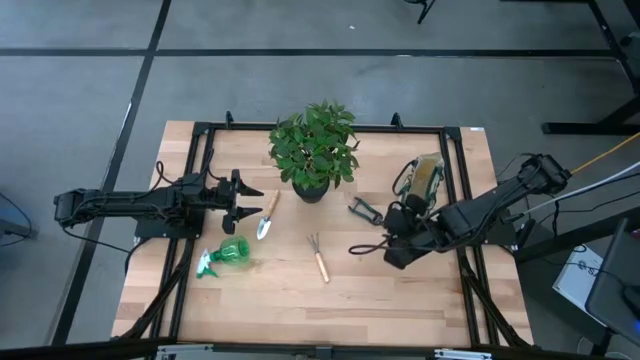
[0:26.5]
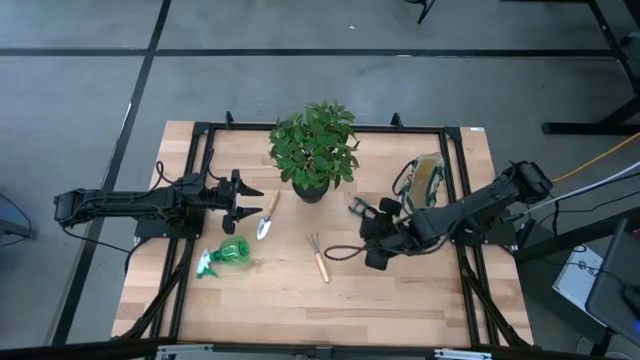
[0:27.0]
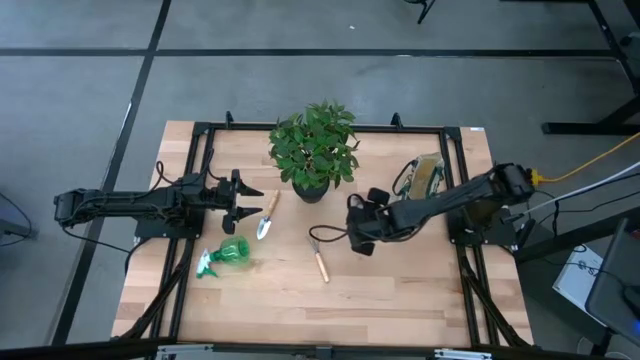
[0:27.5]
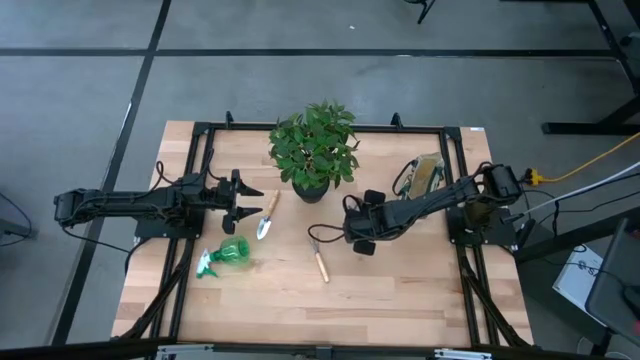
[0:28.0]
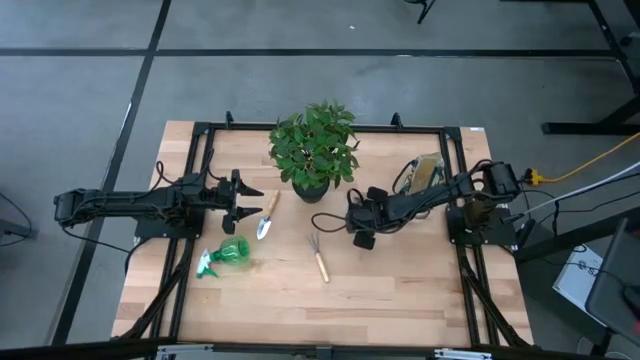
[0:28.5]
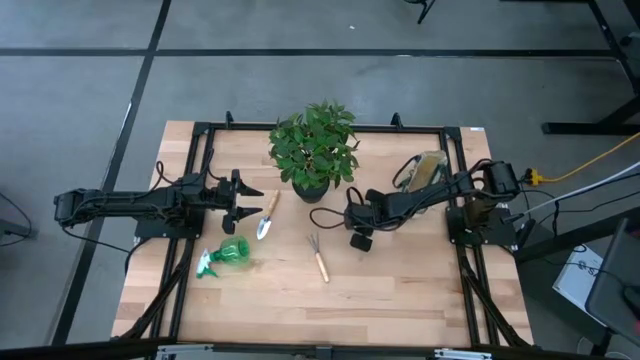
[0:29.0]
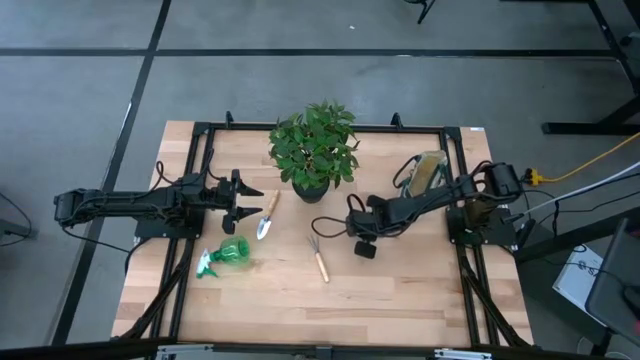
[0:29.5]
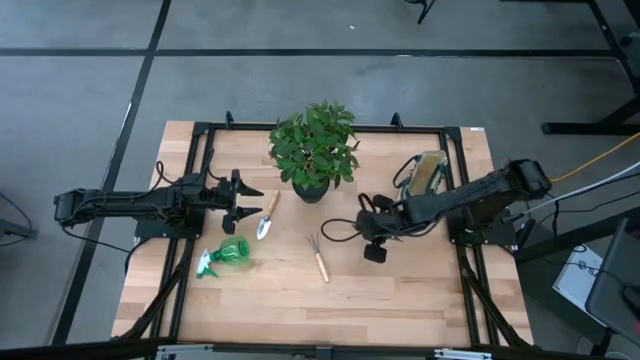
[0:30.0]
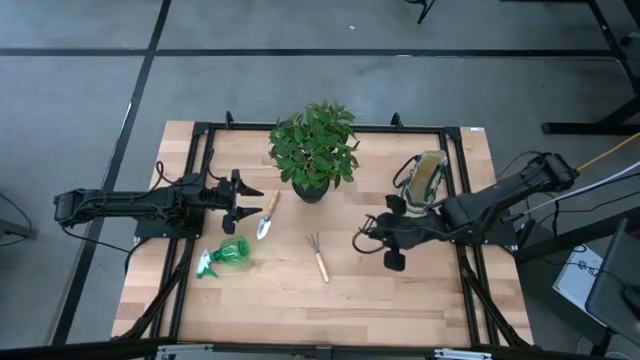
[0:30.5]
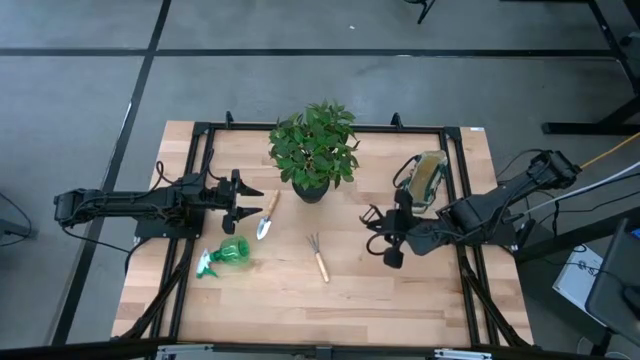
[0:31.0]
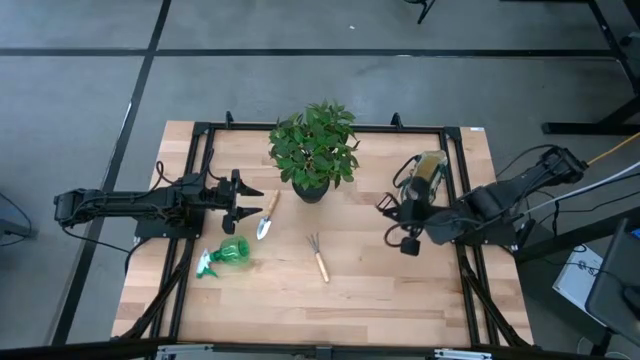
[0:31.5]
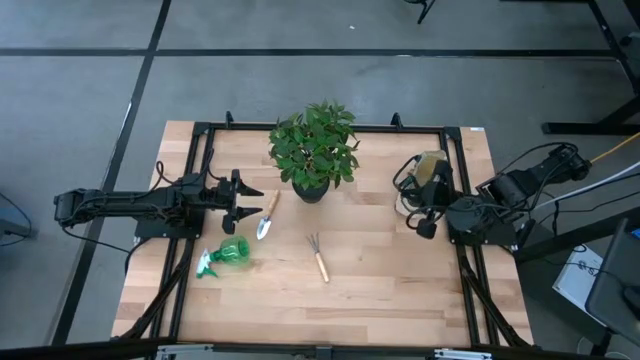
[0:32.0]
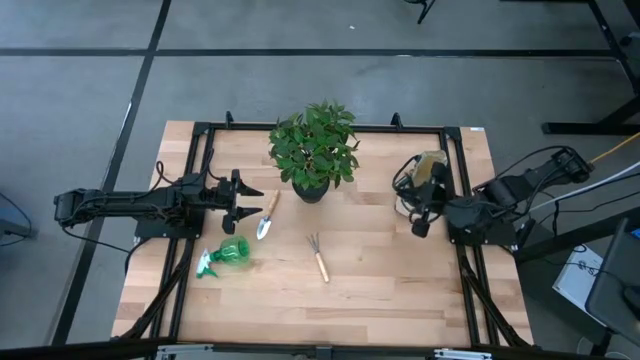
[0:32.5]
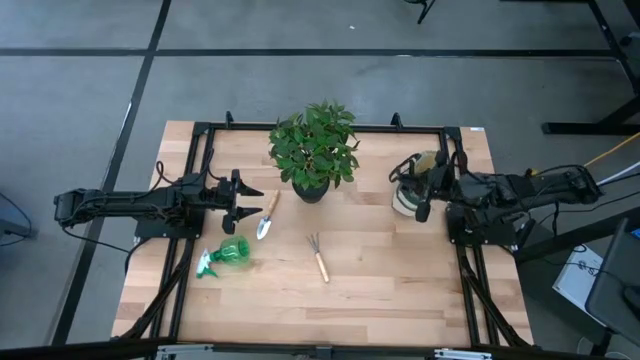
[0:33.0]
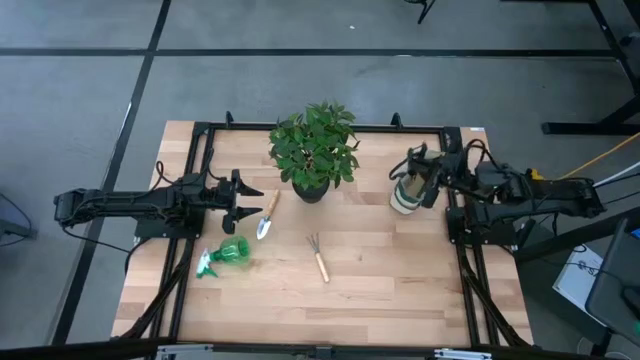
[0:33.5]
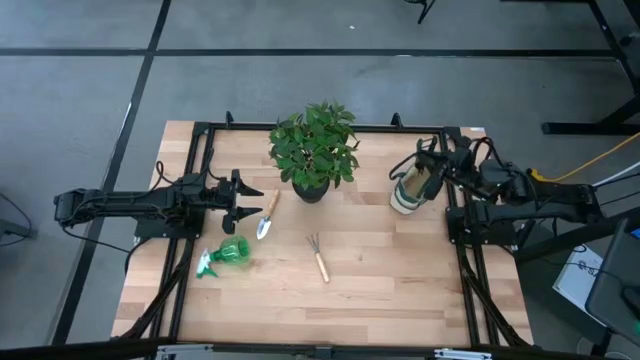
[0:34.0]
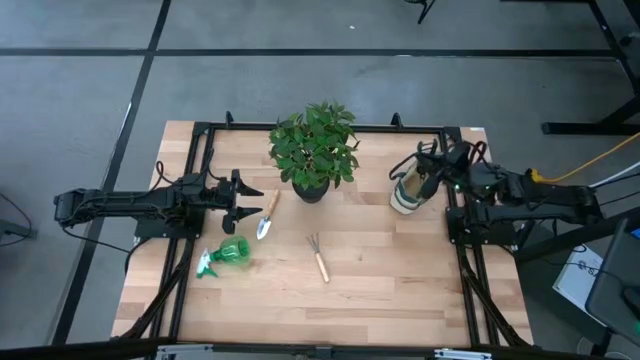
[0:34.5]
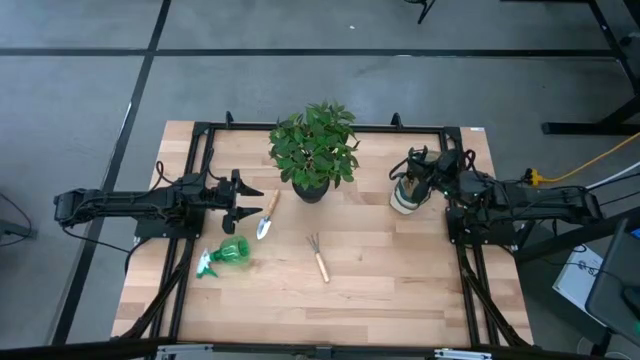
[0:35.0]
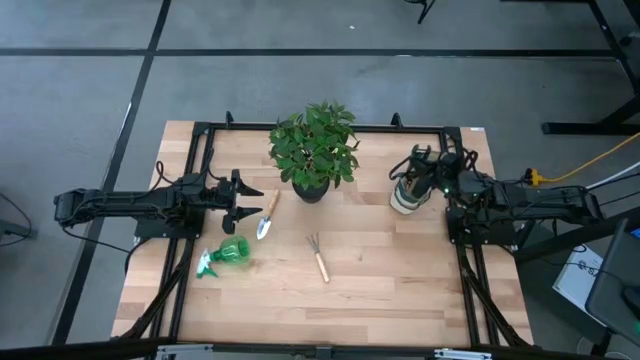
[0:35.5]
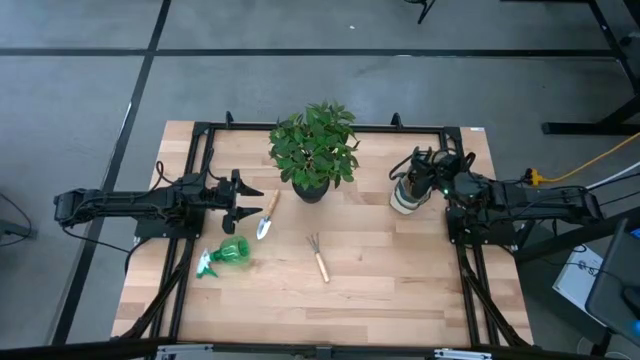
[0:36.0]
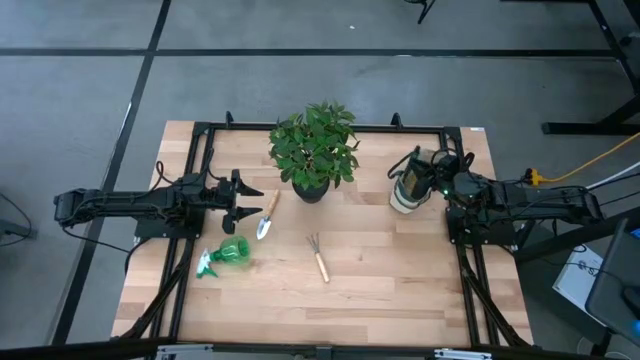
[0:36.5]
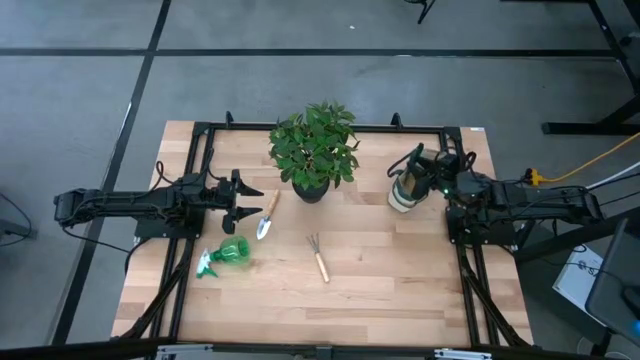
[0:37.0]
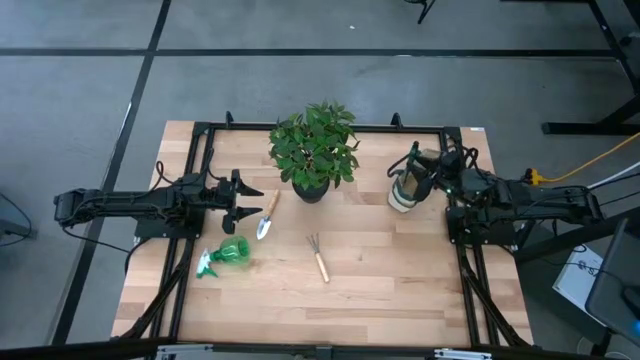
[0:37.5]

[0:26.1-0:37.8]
Task: Pick & Place Garden tools in Gardening bag
Put the green pruning shear into the white gardening bag

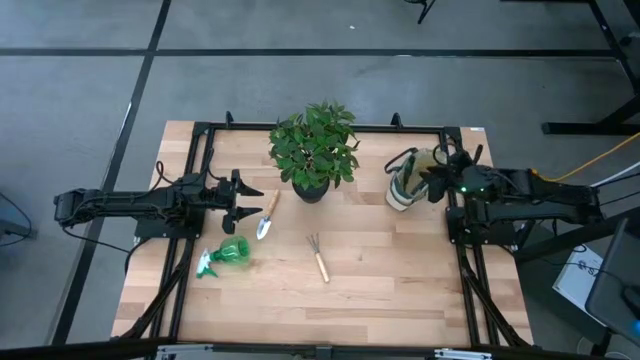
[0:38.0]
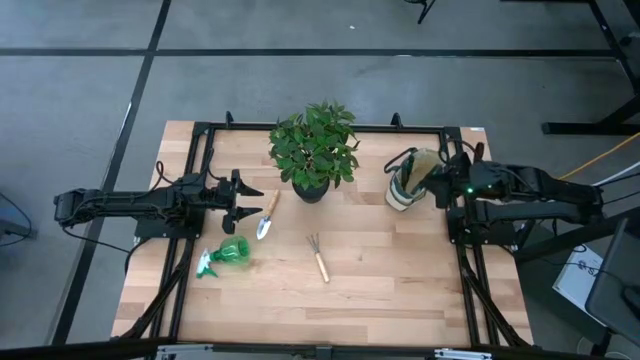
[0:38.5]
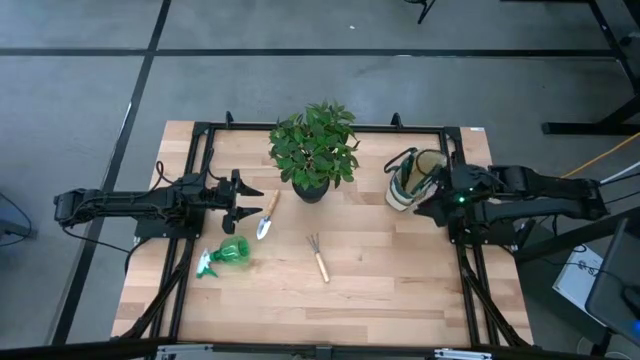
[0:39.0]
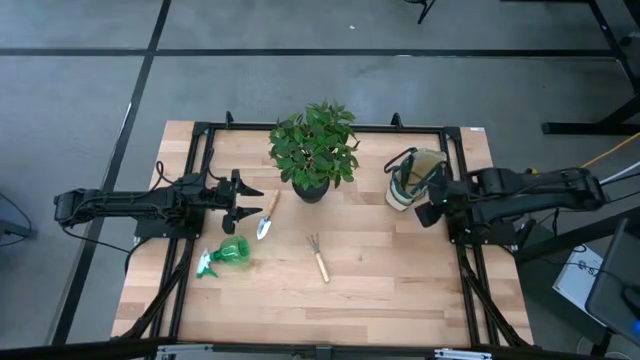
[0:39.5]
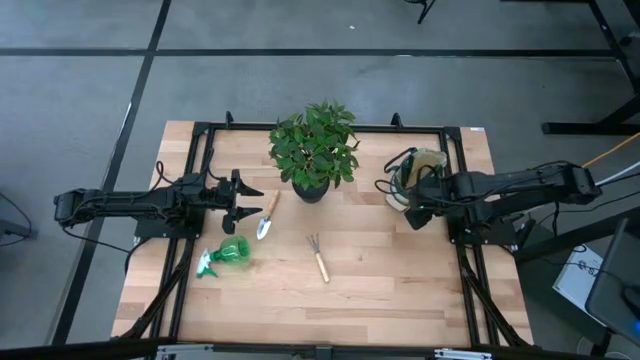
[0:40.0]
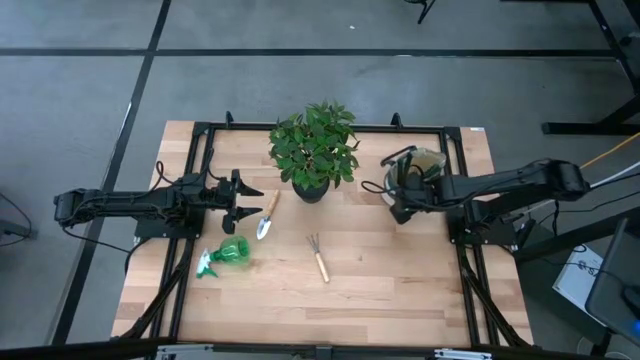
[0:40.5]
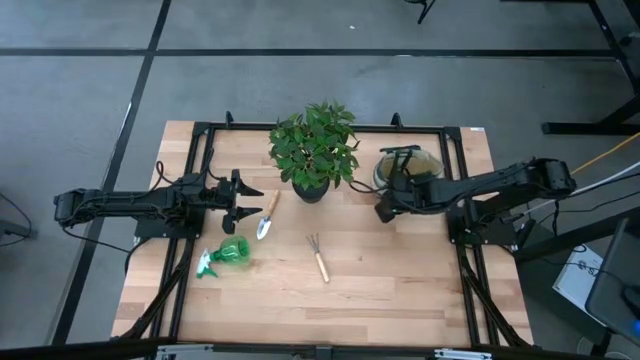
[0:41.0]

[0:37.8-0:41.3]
Adjust the white gardening bag

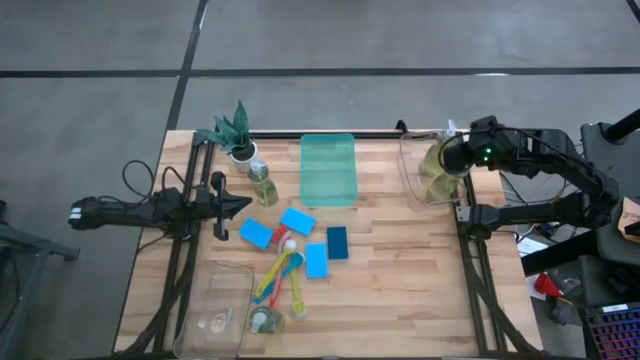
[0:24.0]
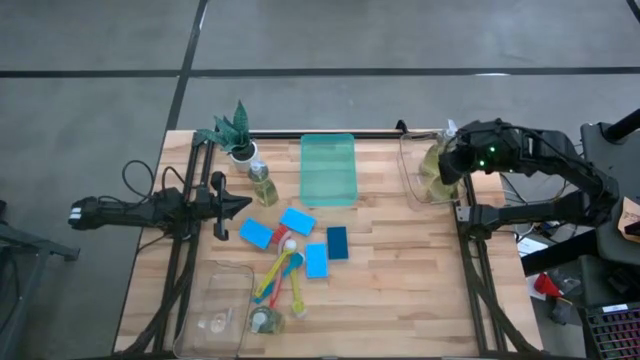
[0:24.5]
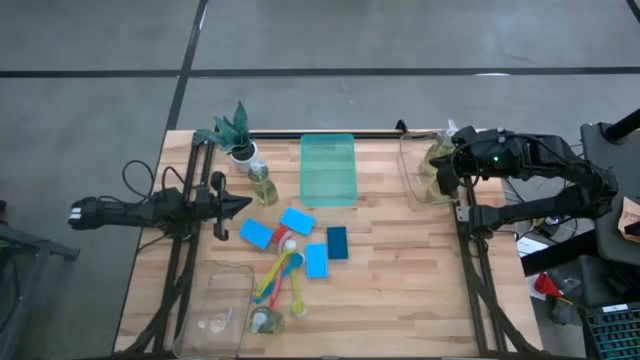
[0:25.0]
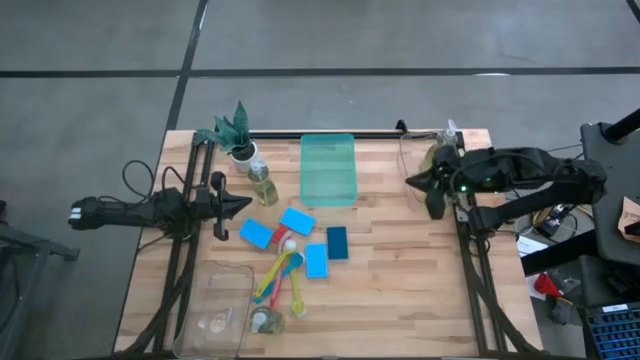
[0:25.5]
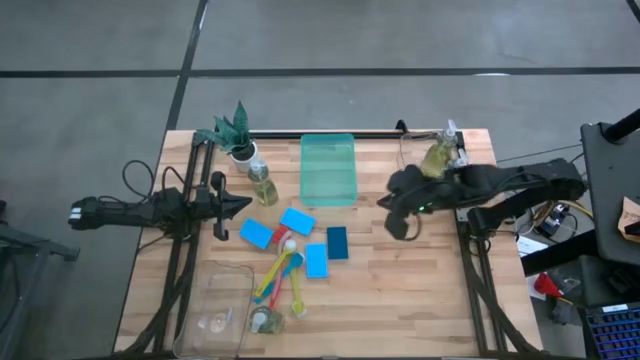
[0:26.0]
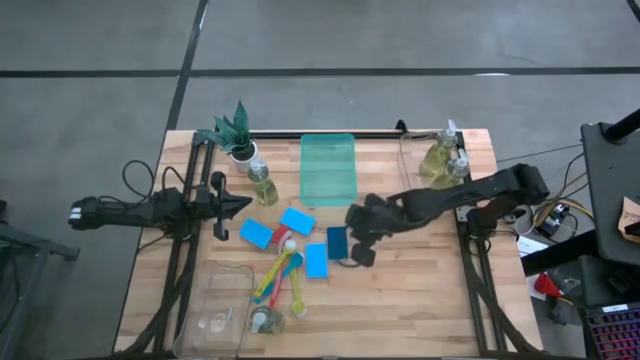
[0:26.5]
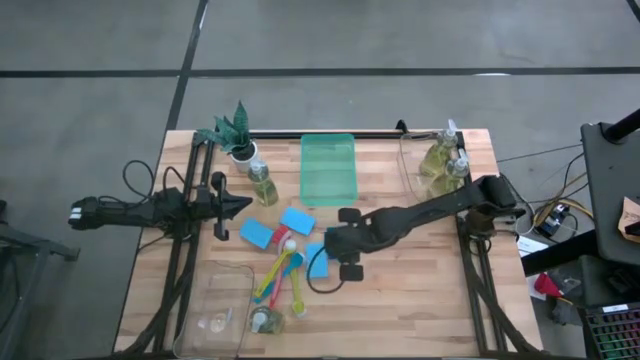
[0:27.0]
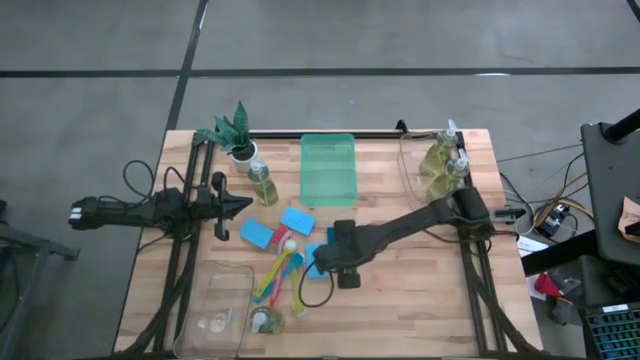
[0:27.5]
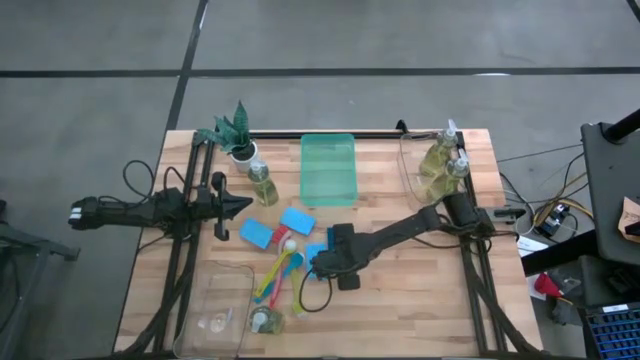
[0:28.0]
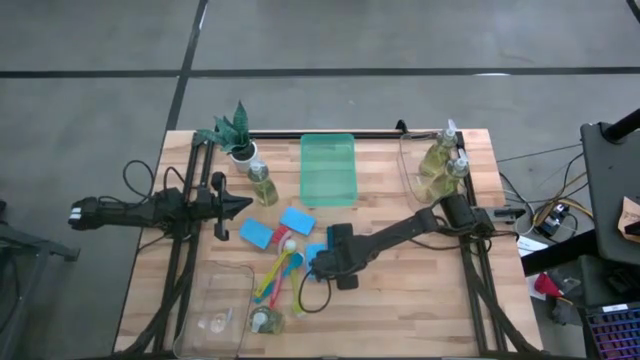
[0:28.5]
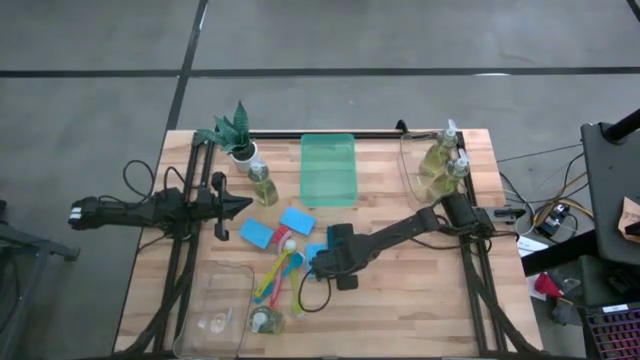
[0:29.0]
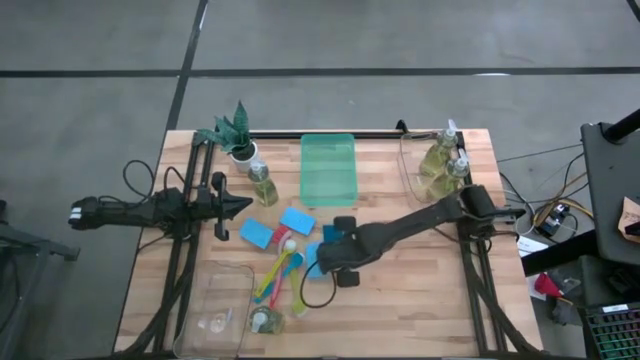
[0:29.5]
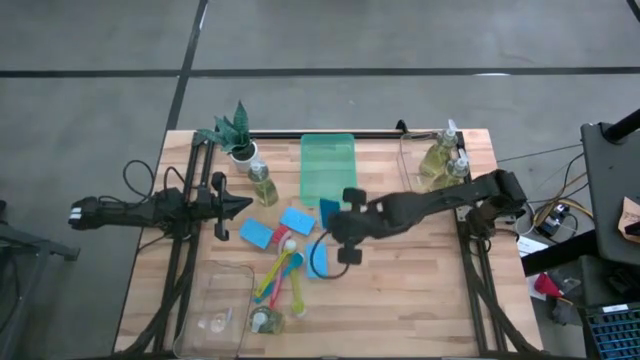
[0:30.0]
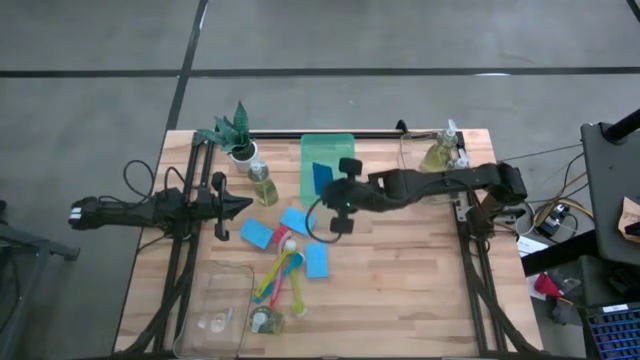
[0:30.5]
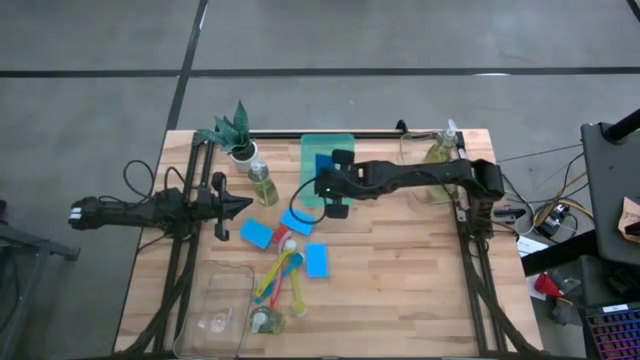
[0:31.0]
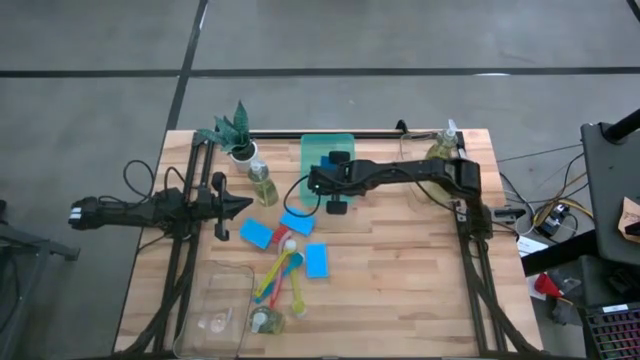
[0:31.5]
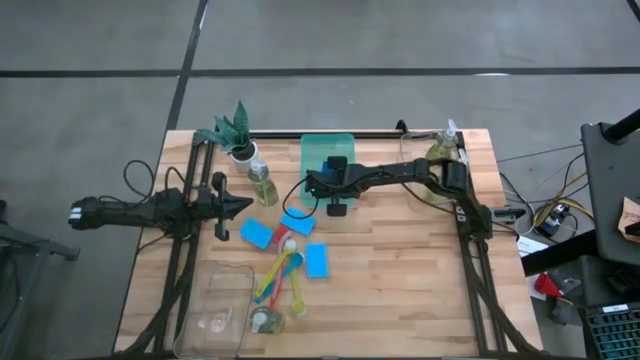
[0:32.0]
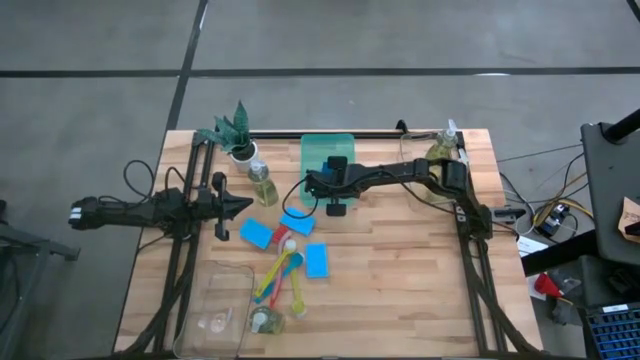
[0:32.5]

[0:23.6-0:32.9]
Task: Pick & Place Kitchen Sink Supplies
Put the blue sponge into the green bin
